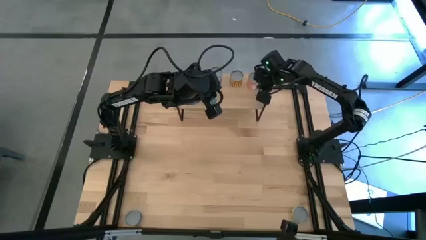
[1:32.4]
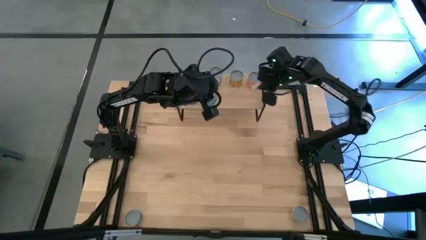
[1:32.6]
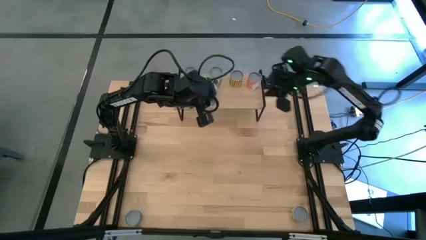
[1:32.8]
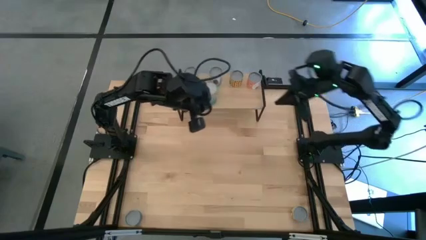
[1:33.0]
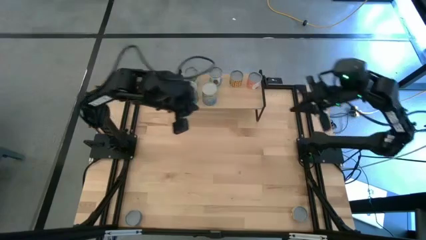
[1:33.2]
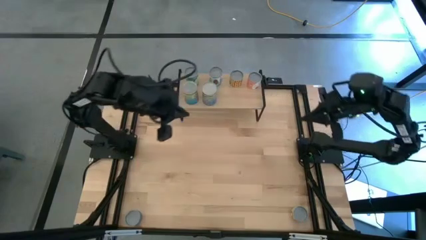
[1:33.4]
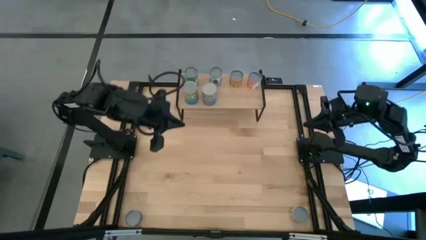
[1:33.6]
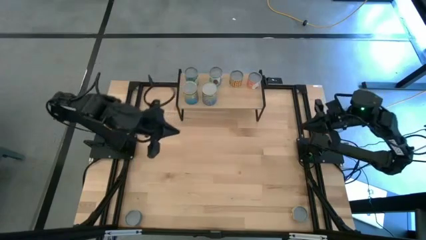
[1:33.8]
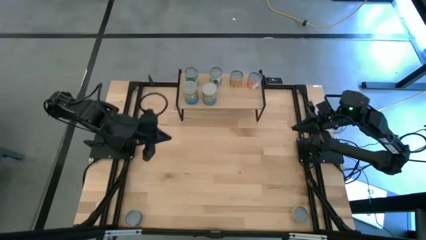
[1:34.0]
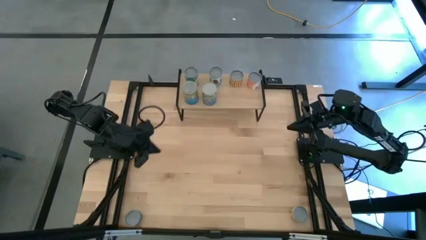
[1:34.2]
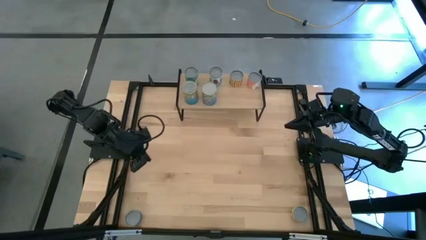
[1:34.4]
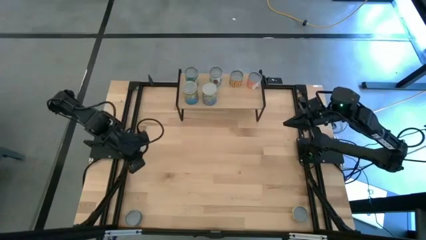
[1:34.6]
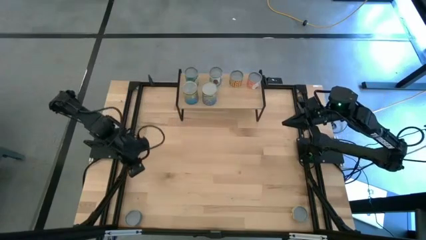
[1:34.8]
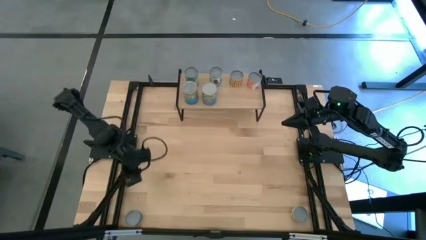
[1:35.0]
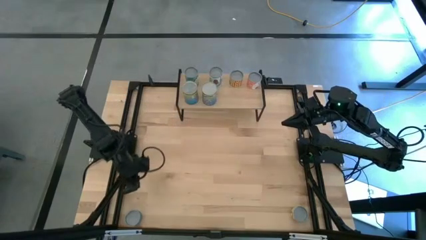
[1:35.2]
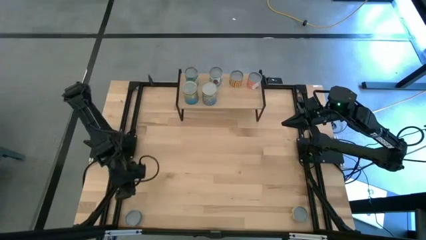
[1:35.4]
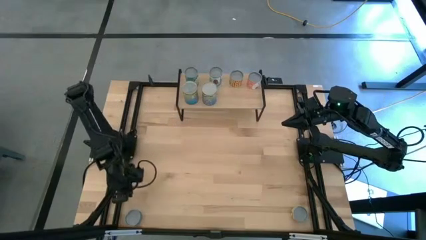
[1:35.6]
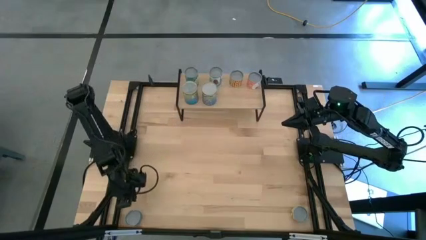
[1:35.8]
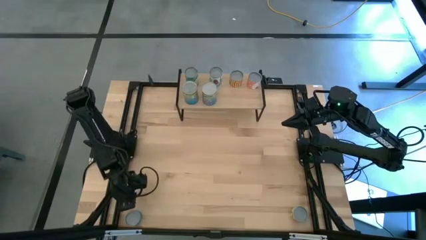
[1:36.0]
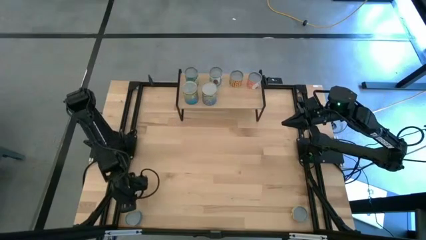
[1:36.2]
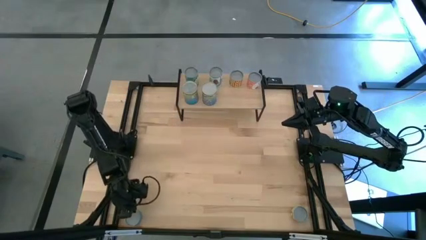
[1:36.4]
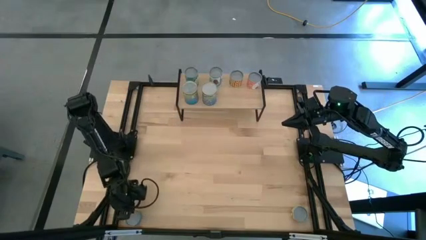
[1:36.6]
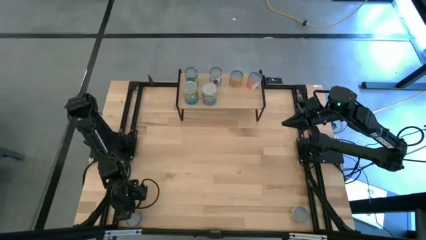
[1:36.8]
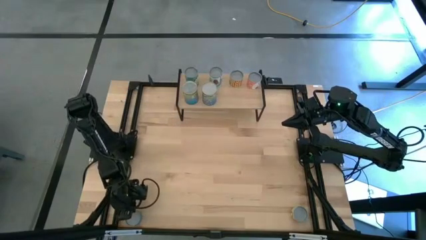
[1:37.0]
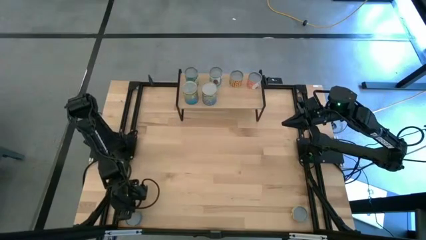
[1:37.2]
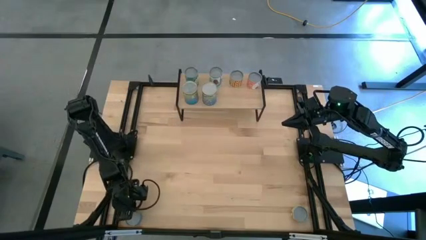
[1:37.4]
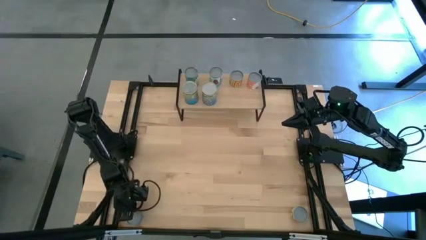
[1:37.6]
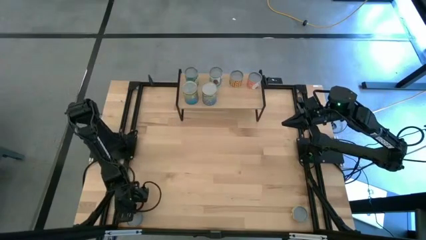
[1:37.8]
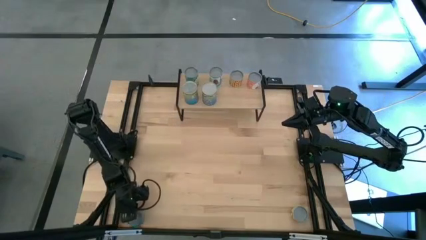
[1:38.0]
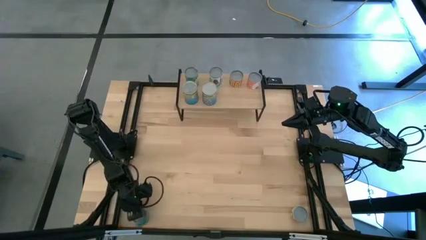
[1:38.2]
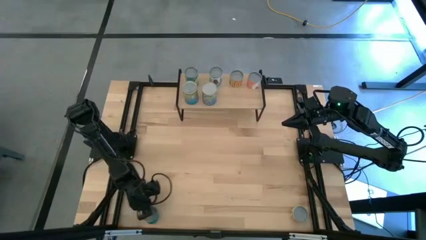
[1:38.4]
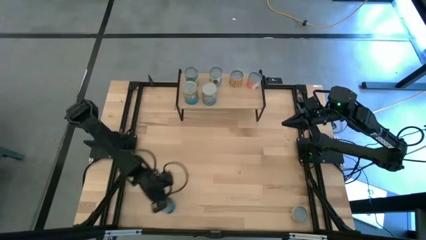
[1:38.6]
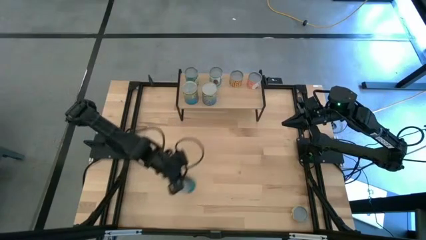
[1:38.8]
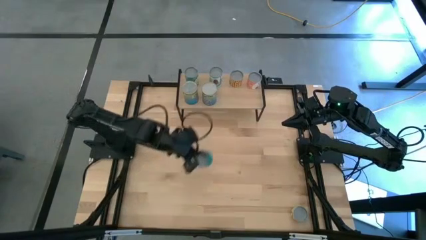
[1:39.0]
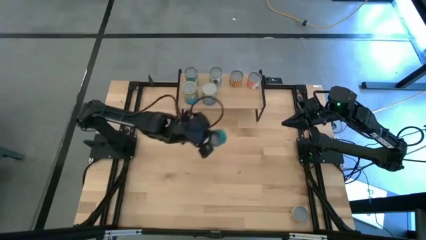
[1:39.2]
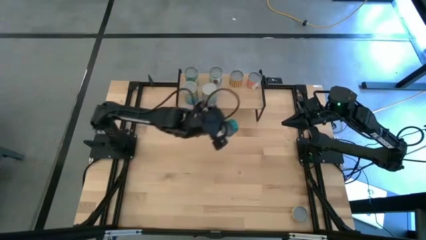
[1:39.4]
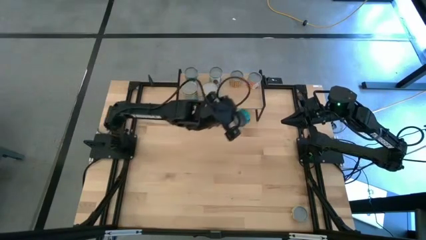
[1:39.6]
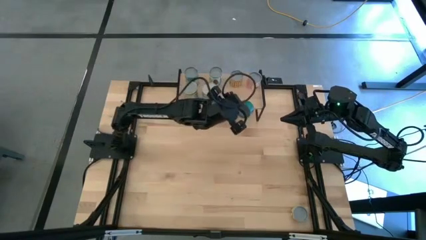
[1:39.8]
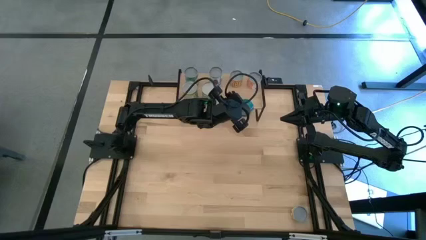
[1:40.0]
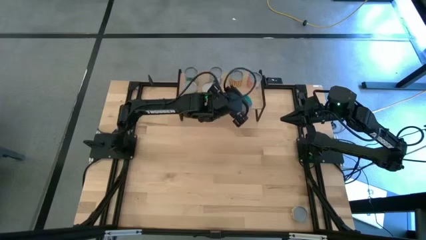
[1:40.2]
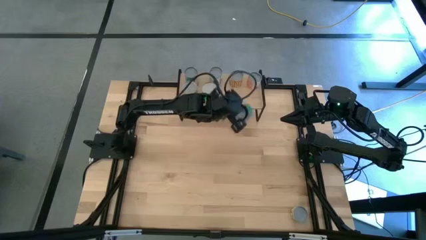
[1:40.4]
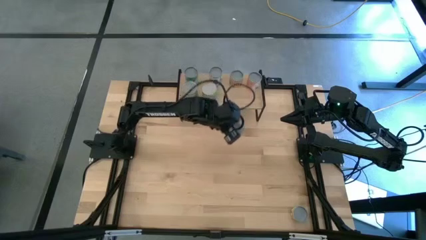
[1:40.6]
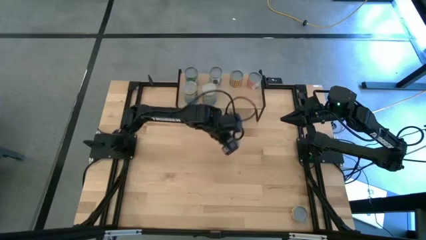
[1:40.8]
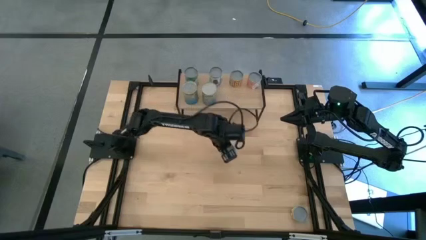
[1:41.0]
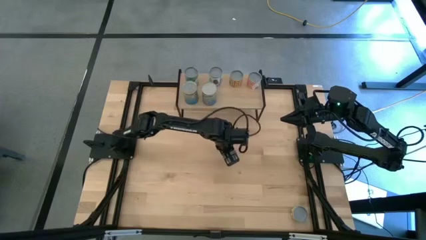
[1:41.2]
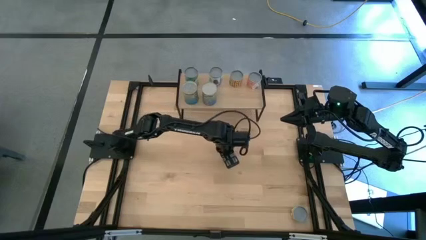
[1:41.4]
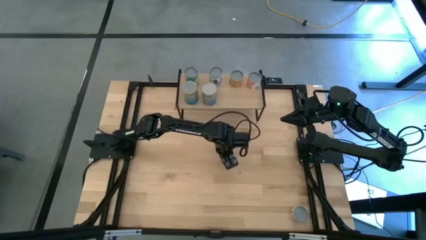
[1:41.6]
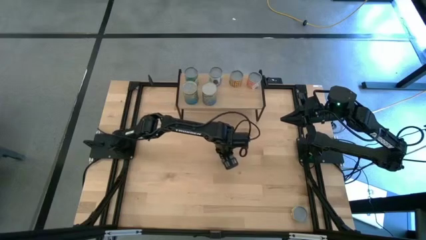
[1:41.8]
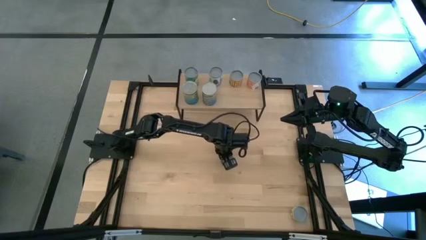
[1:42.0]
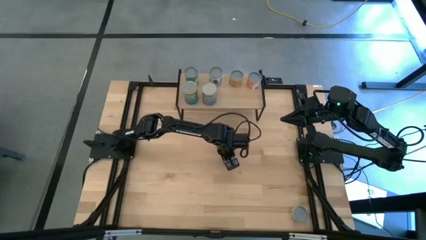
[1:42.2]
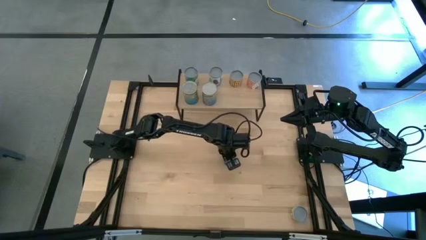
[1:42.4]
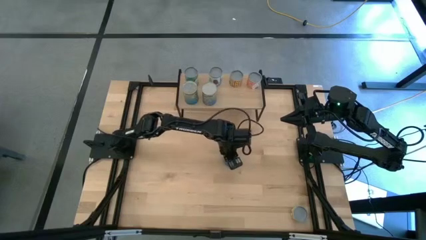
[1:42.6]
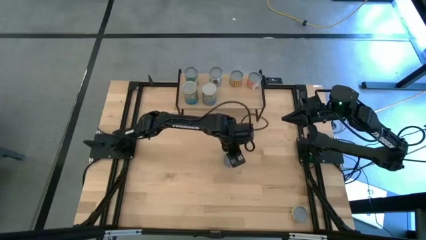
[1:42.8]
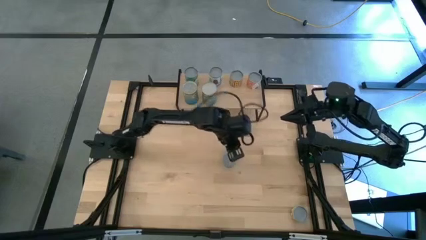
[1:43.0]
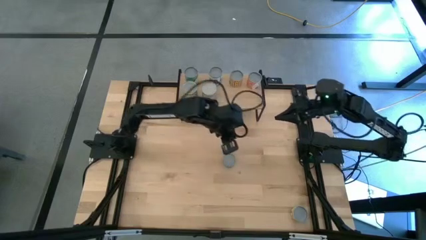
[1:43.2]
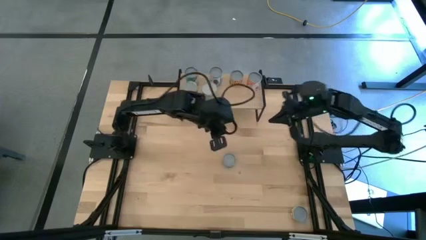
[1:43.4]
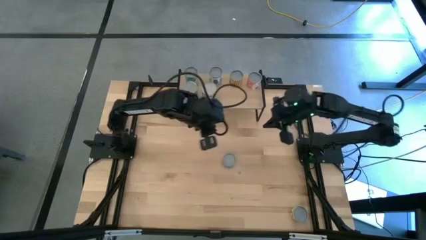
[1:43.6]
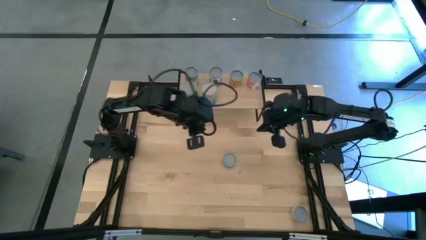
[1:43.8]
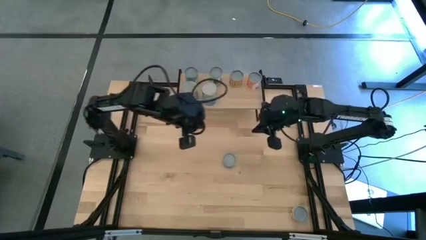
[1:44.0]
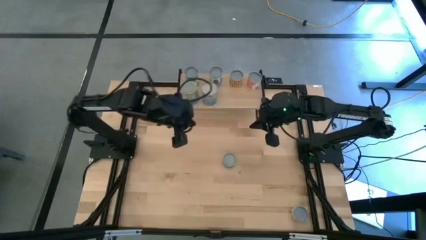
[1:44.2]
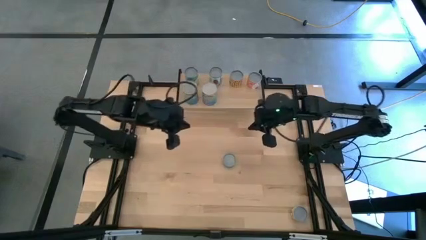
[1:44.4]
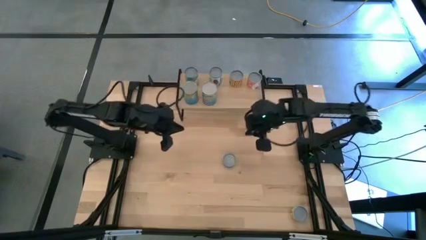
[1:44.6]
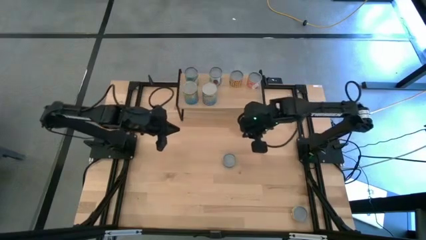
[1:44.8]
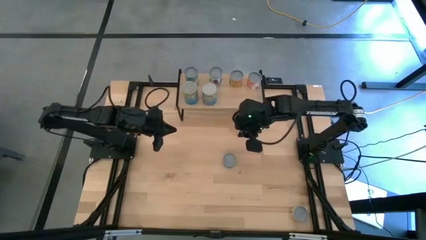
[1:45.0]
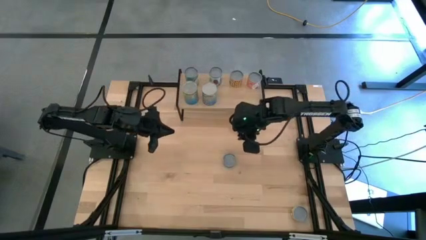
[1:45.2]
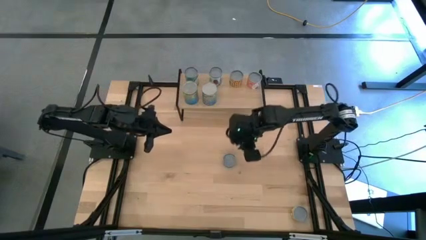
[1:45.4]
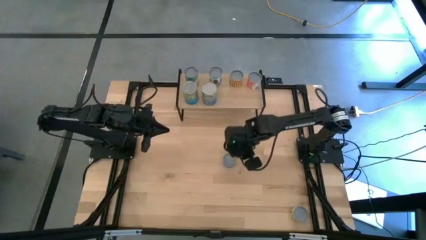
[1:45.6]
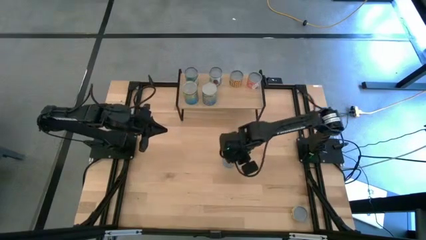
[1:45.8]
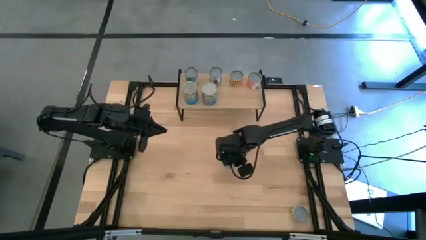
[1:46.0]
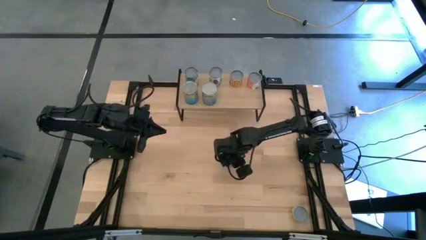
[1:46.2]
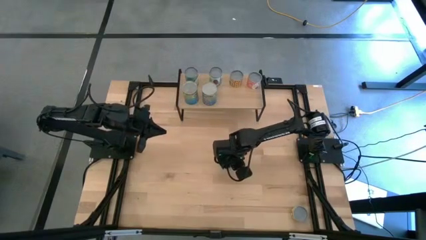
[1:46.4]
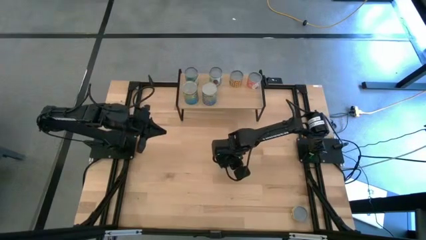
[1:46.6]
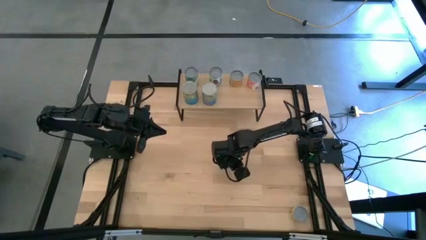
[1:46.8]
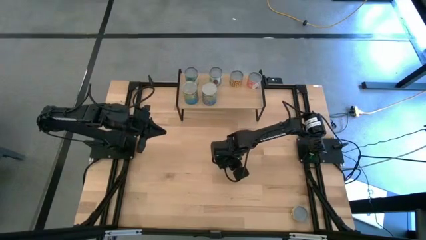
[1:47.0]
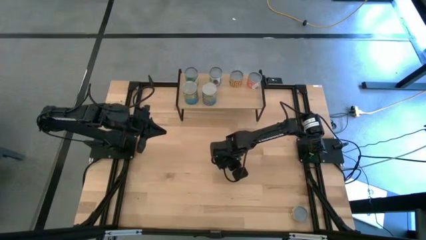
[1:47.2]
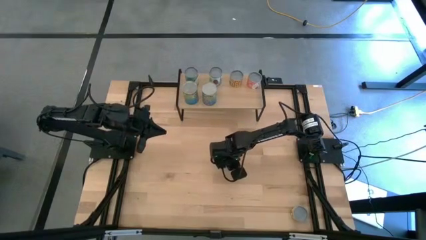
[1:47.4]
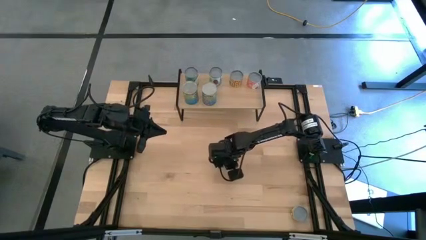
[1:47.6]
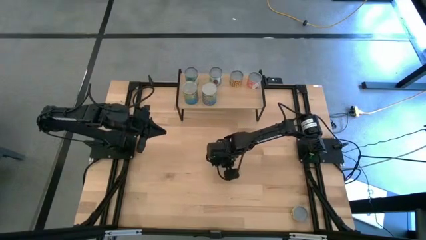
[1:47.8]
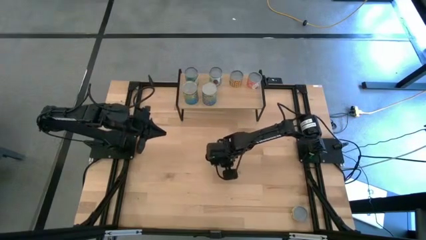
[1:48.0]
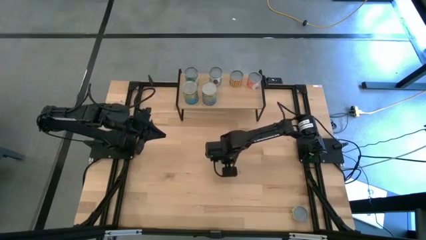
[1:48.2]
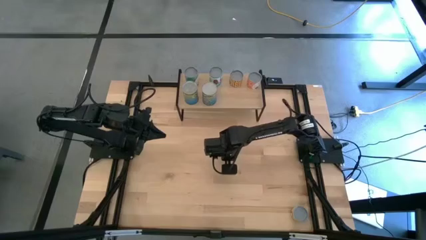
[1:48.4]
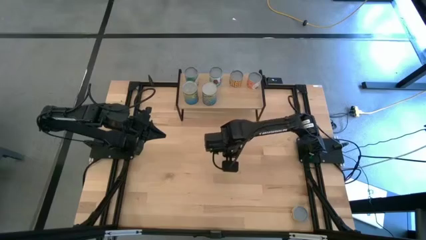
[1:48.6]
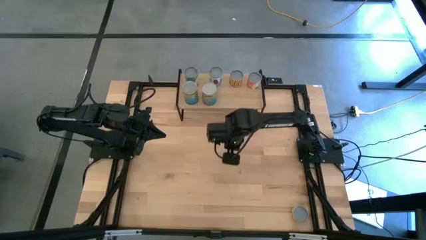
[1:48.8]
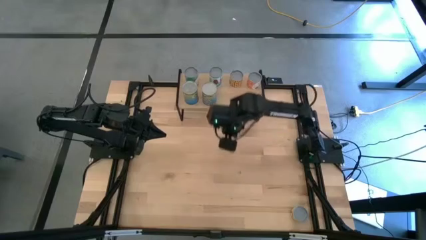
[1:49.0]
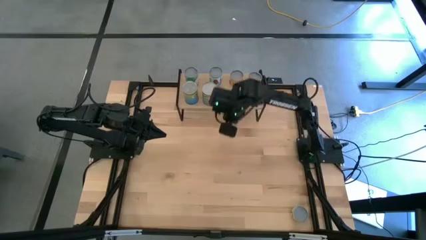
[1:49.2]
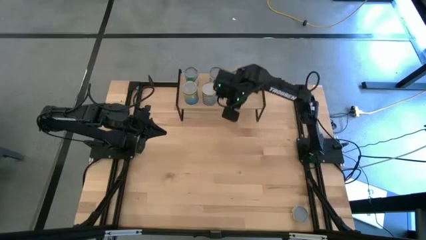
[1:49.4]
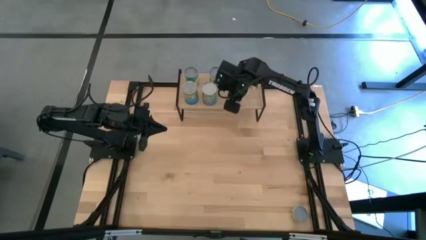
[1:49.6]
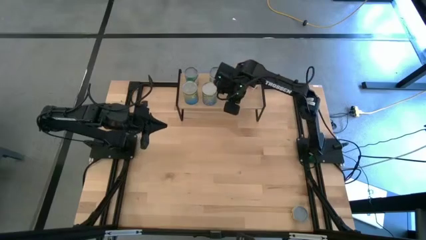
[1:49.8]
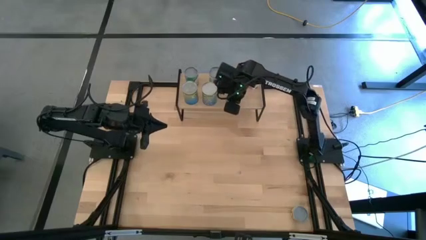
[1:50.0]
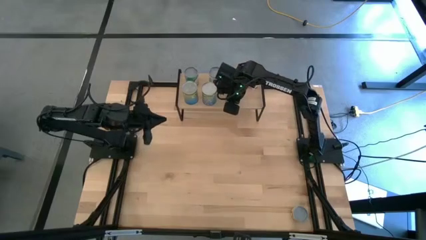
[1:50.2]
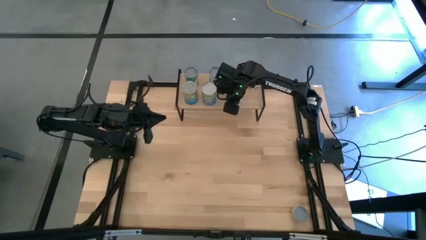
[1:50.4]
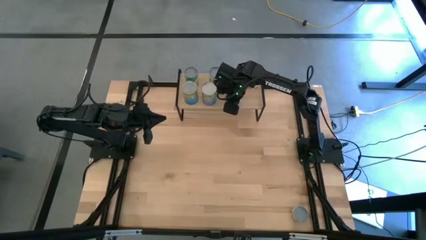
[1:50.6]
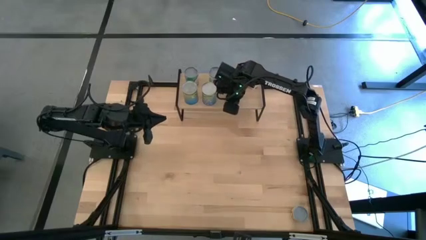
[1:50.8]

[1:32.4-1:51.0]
Task: Pick and place cans onto a shelf
Put the green tuna can on the shelf
